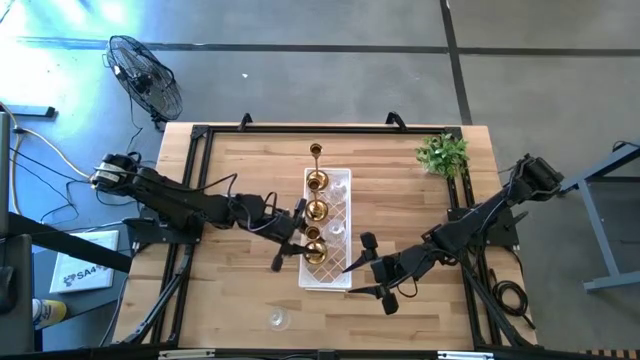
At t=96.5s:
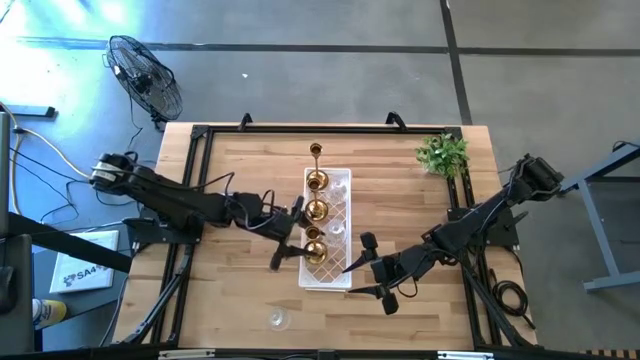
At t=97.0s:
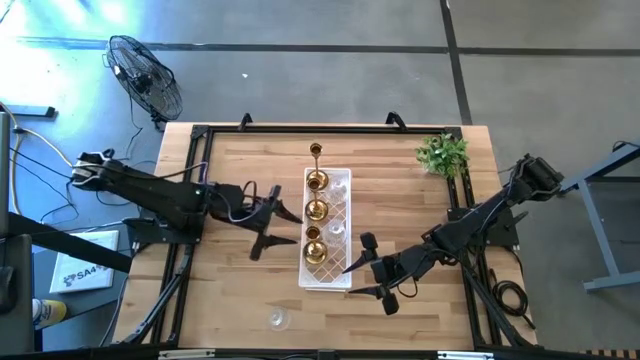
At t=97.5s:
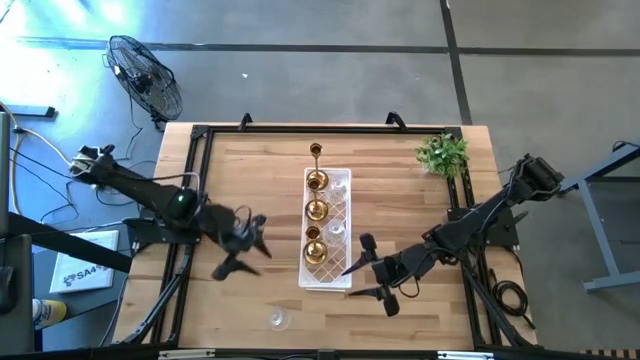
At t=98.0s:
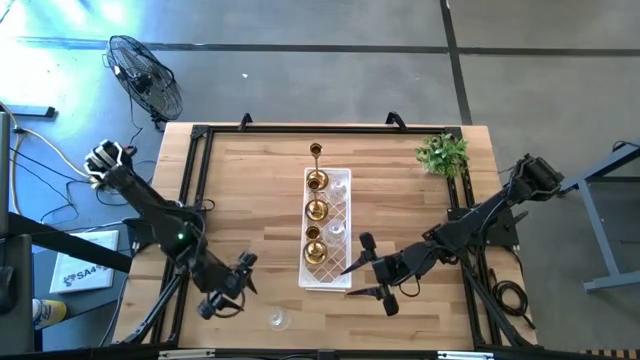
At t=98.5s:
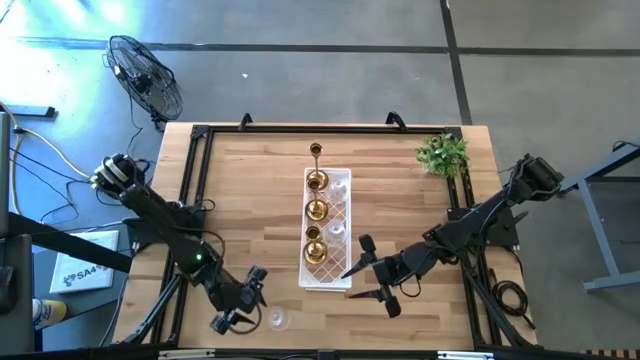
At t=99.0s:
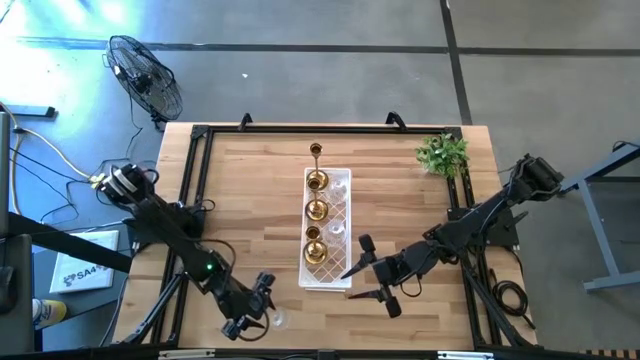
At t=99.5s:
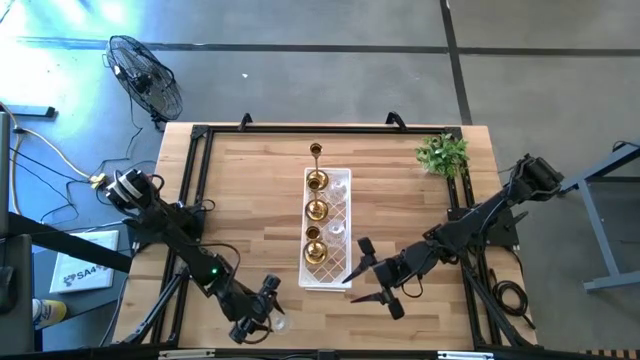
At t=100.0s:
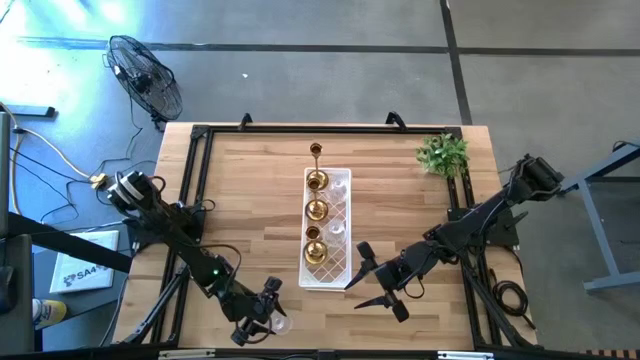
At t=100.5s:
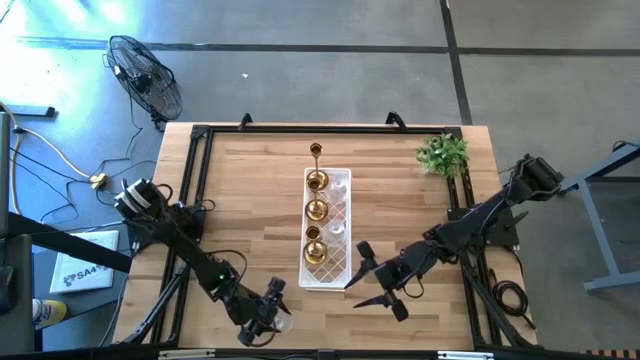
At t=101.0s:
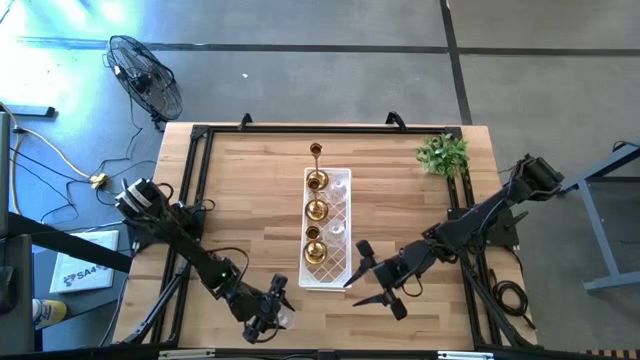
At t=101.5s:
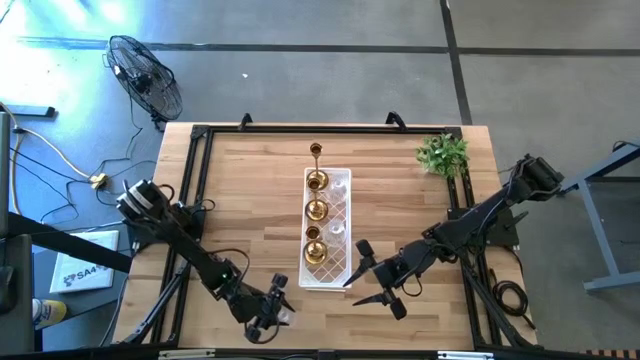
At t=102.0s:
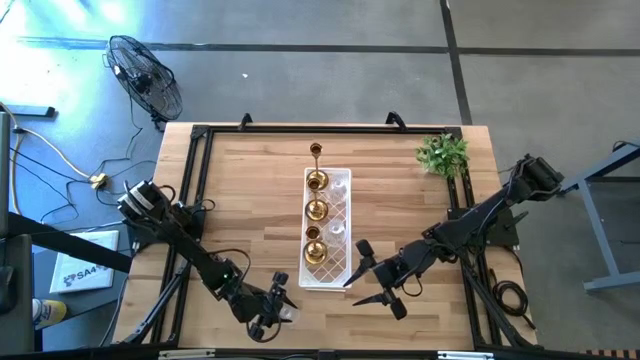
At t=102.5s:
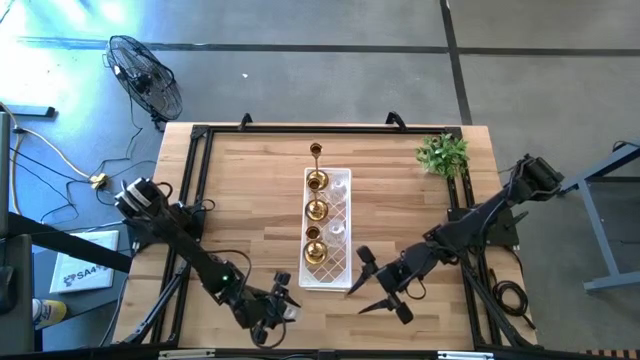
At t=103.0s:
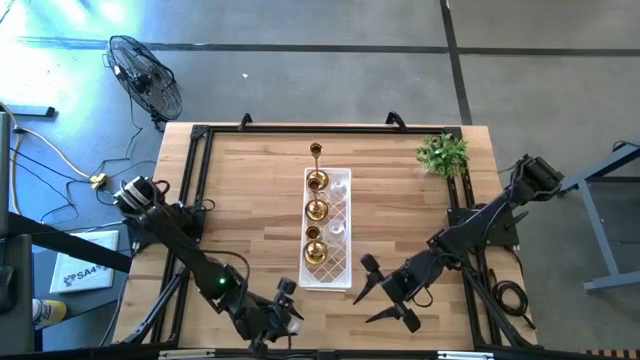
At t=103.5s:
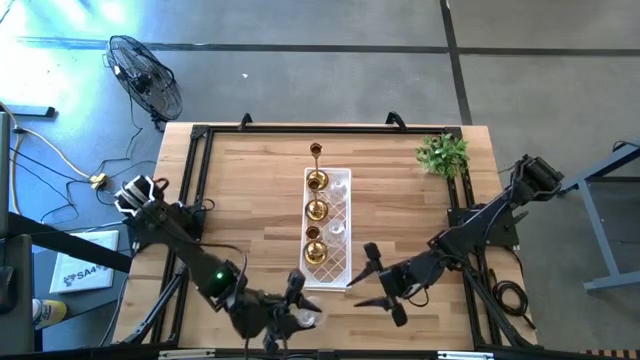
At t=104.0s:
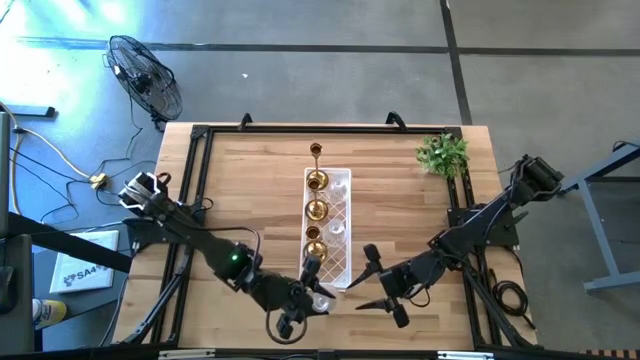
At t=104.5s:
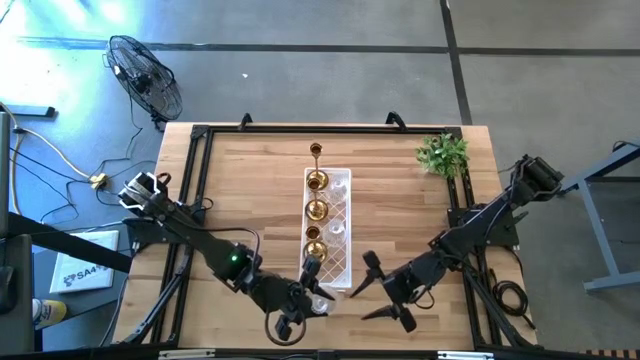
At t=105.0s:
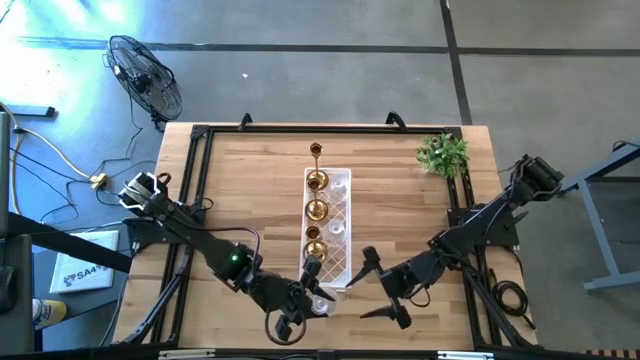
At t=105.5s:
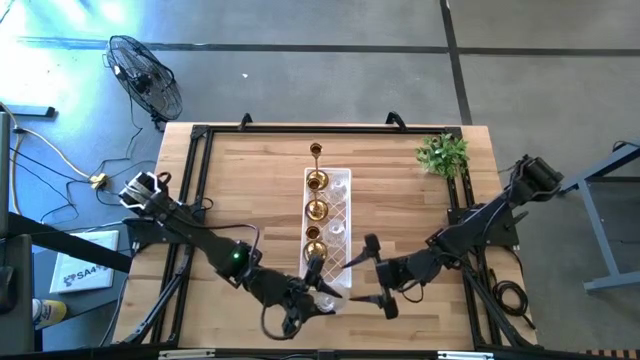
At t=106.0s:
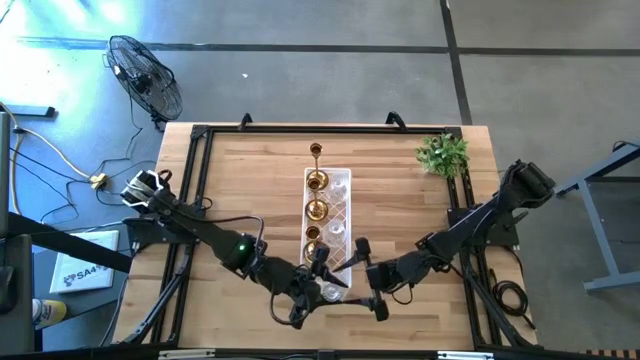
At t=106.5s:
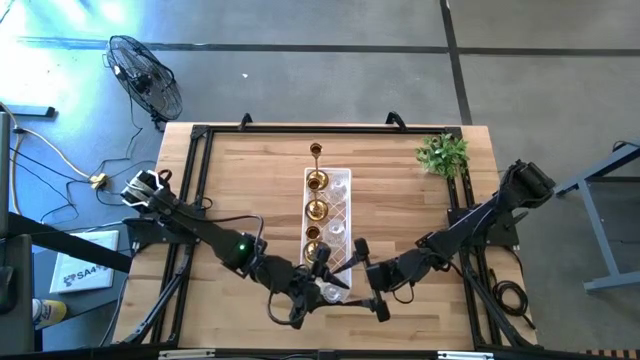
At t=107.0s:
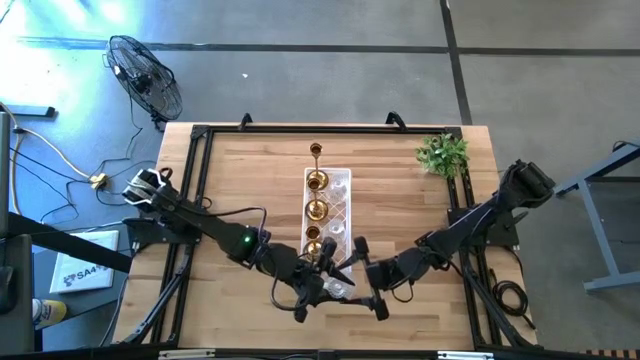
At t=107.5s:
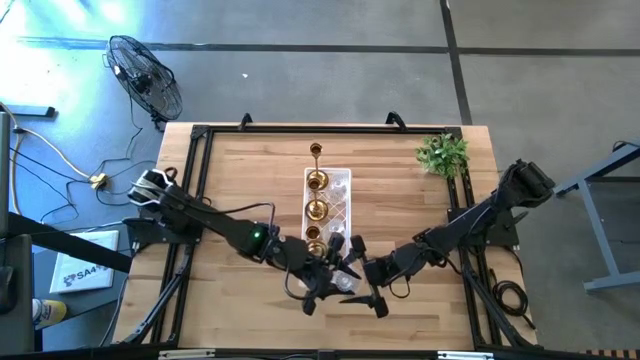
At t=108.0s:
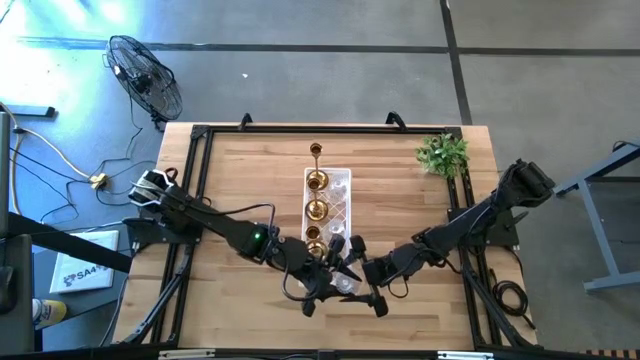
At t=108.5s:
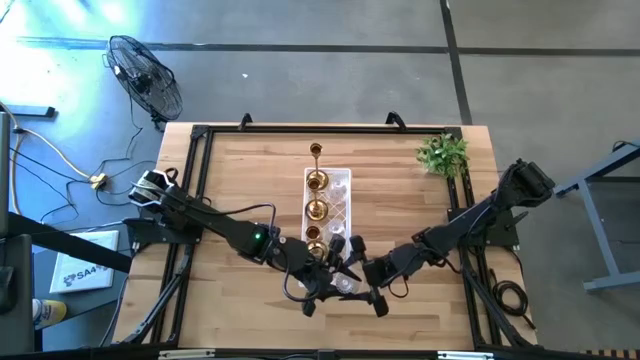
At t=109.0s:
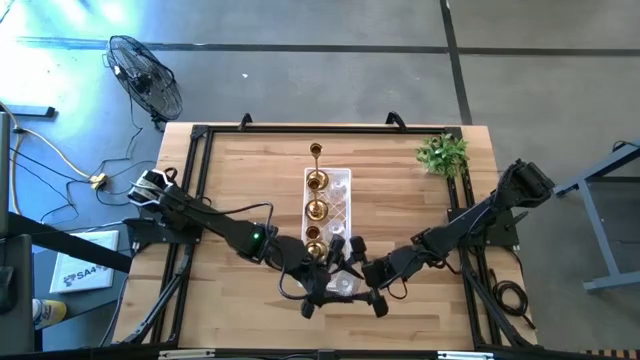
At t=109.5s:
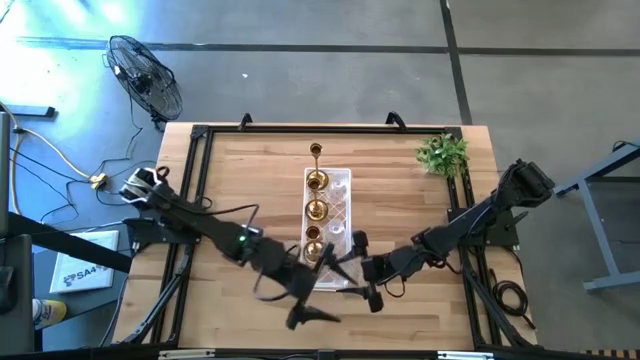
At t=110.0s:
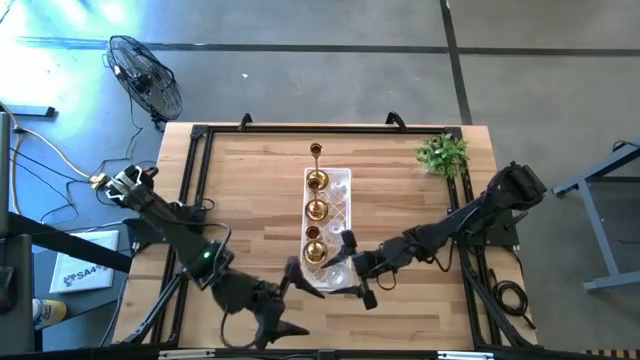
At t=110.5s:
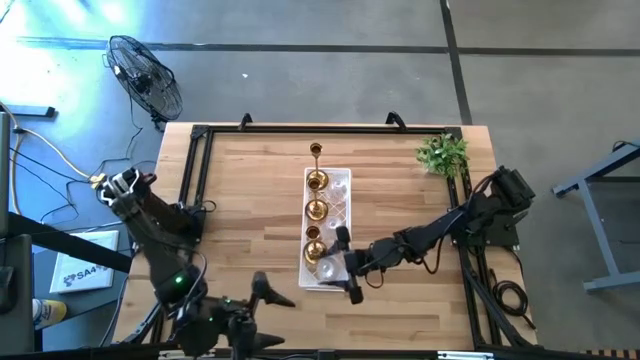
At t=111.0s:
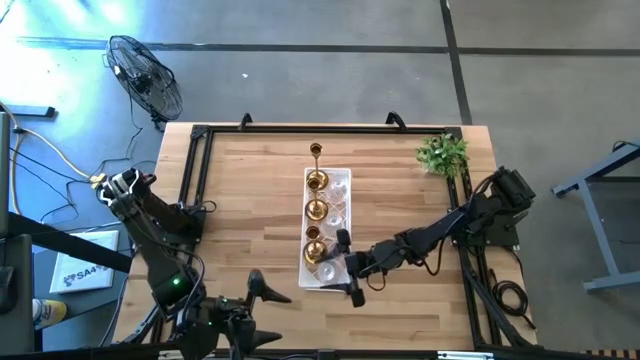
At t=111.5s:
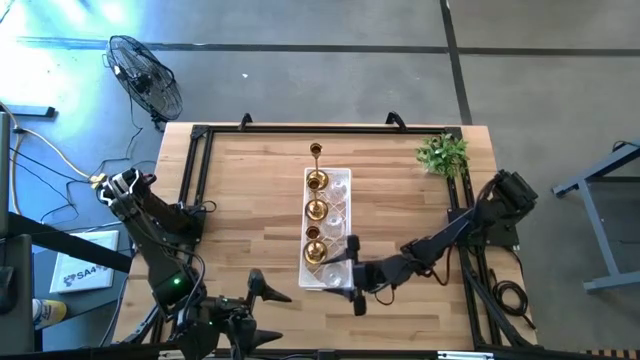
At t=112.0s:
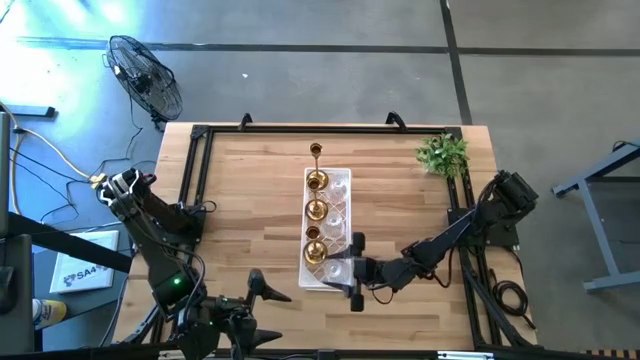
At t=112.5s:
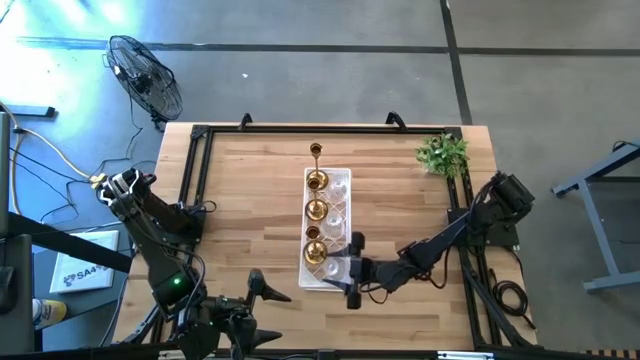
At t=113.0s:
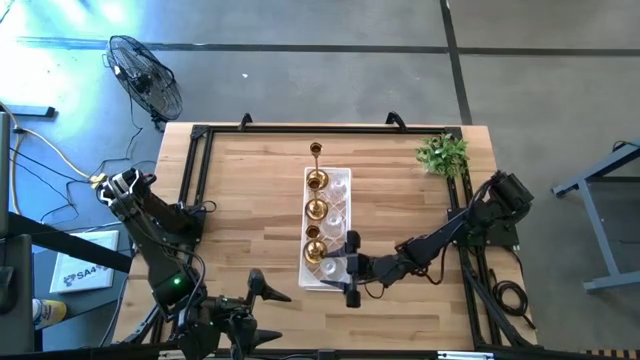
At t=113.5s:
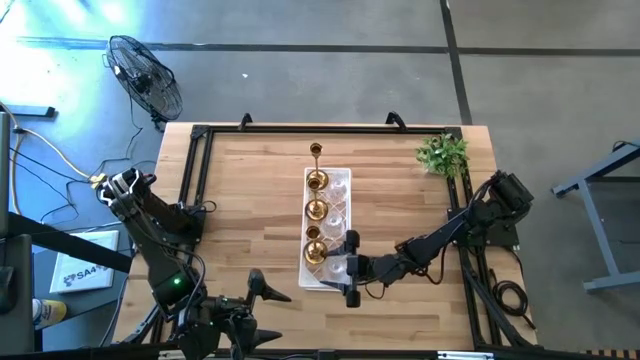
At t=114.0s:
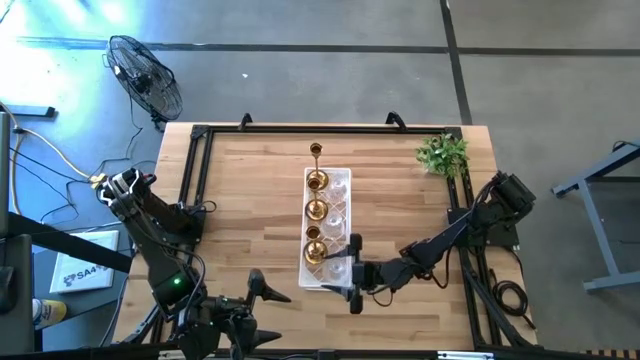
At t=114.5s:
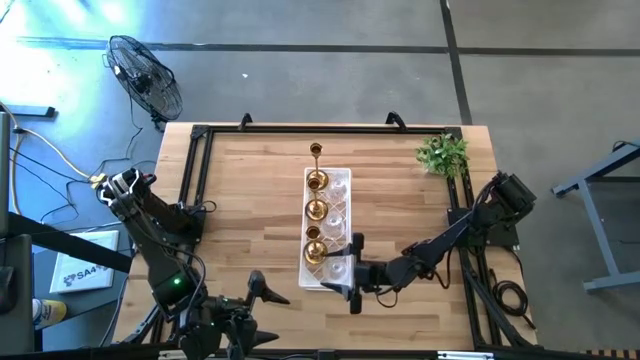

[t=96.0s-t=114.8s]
Task: Pick & Place candle stick holders
Put the transparent candle holder on the shelf aligned with the other transparent candle holders

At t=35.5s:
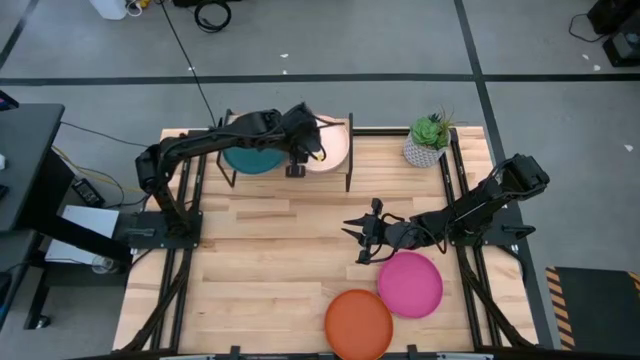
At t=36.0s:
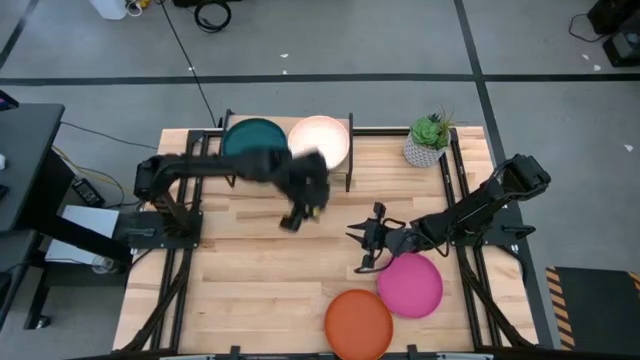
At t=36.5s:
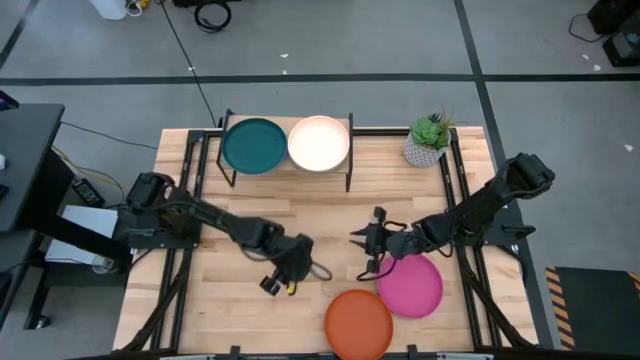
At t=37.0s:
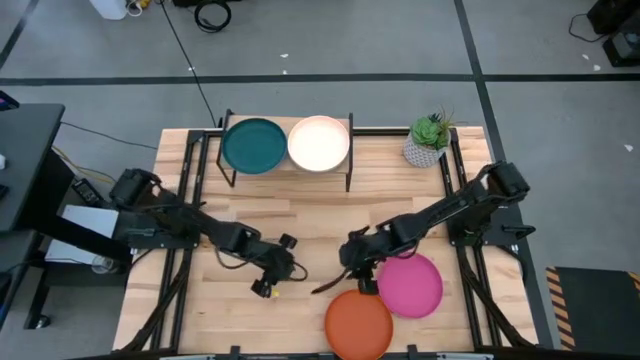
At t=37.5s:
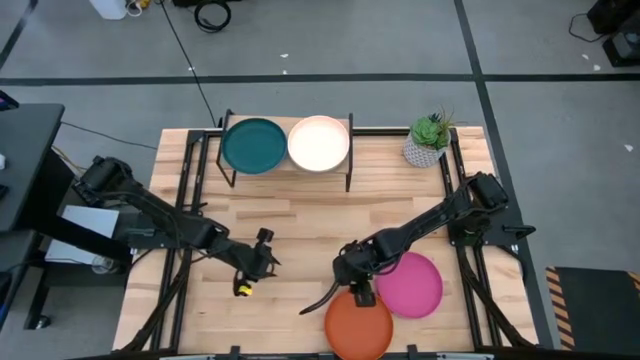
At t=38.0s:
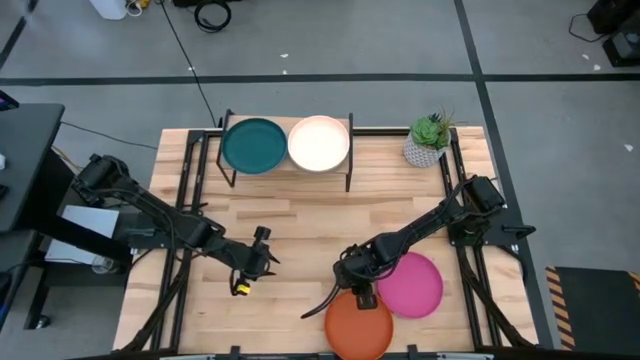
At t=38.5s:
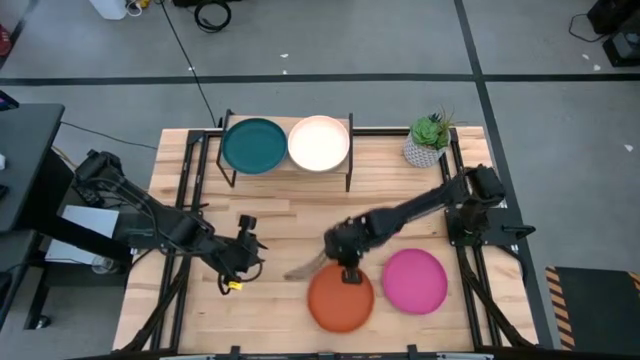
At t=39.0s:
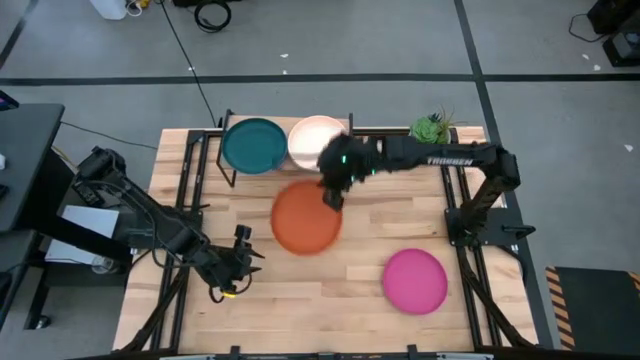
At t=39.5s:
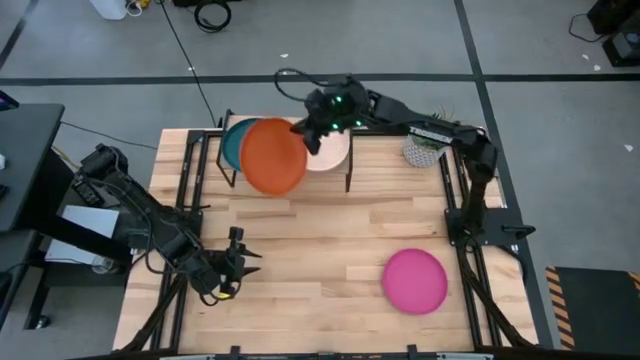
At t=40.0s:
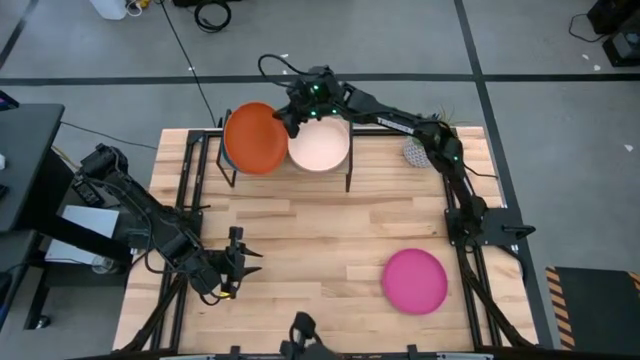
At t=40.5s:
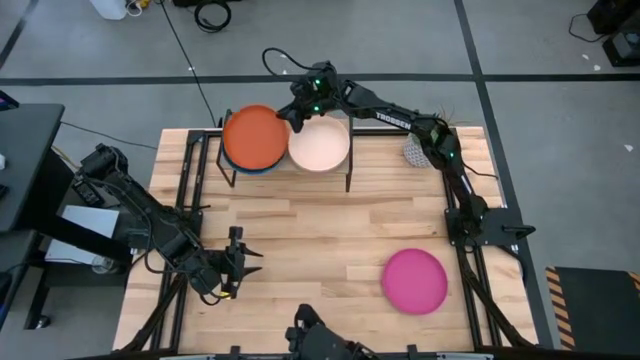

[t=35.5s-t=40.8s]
Task: Place and stack plates onto a shelf
Stack the orange plate on top of the dark blue plate on the shelf
